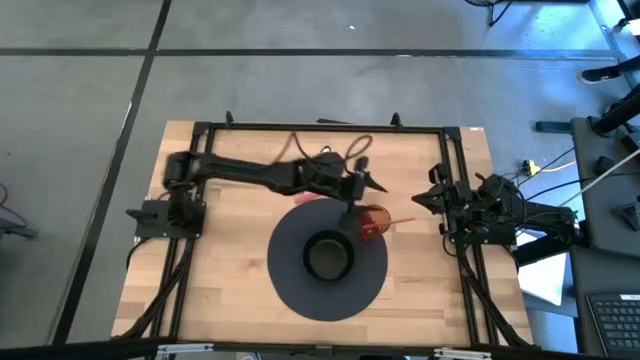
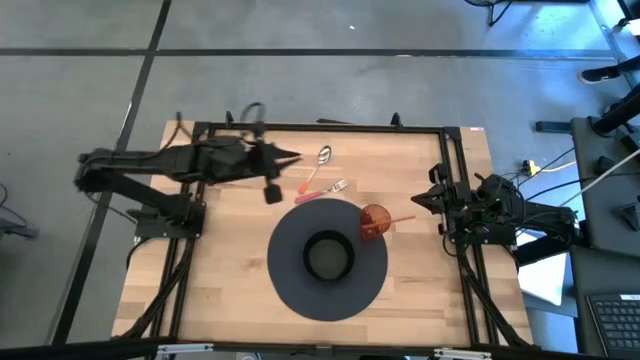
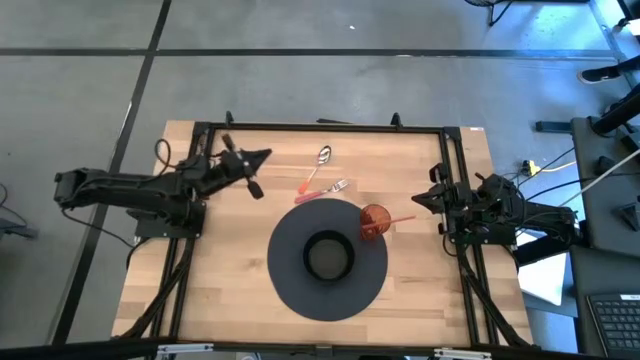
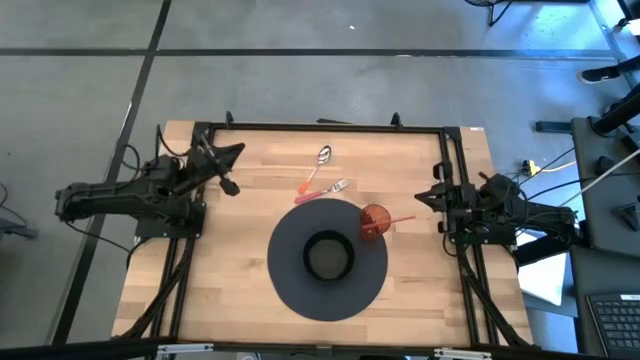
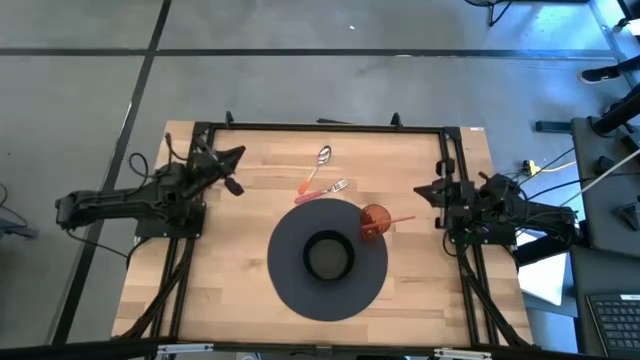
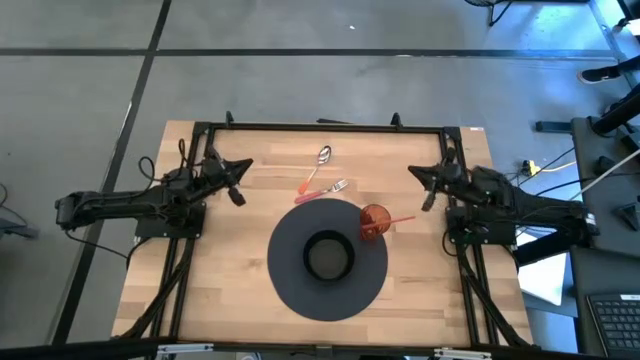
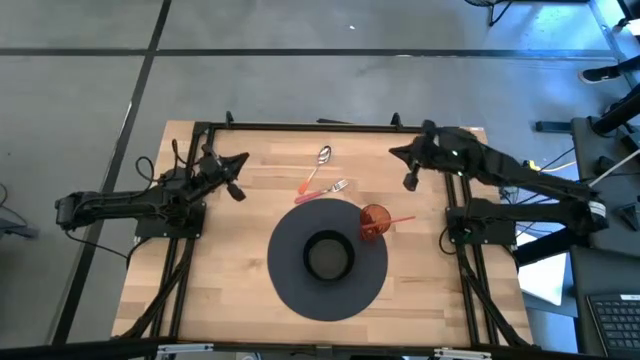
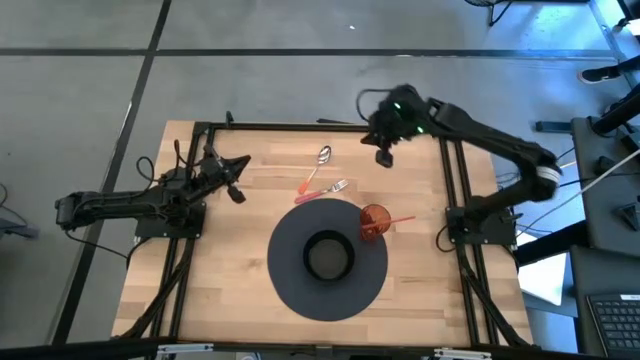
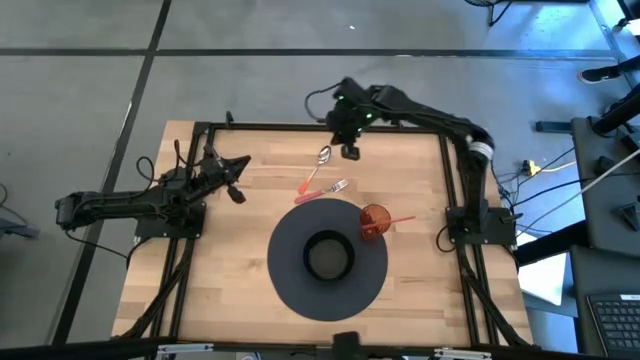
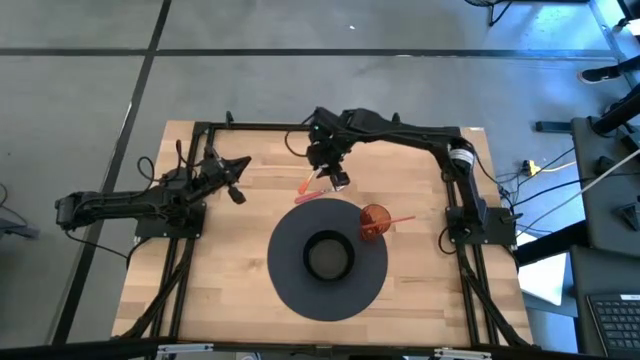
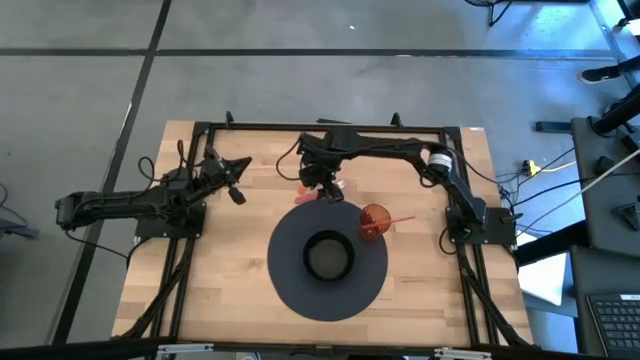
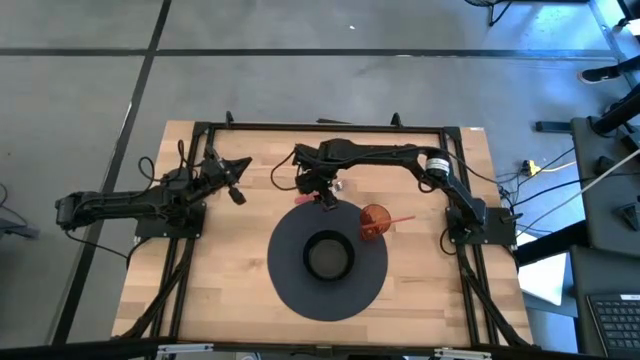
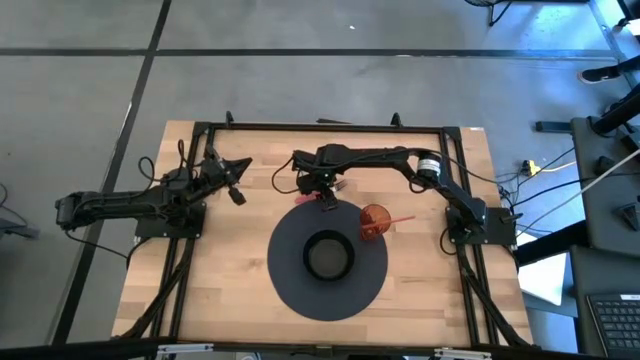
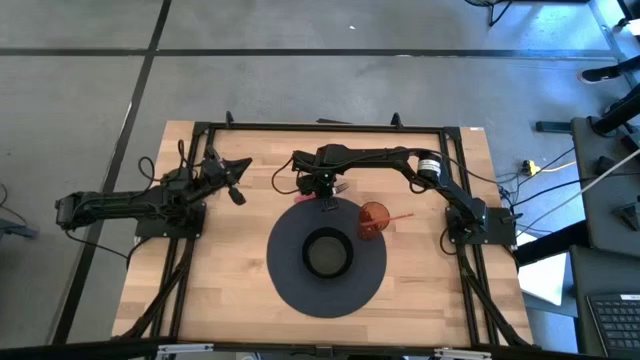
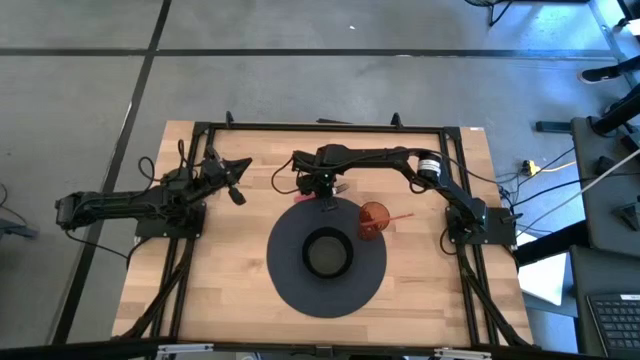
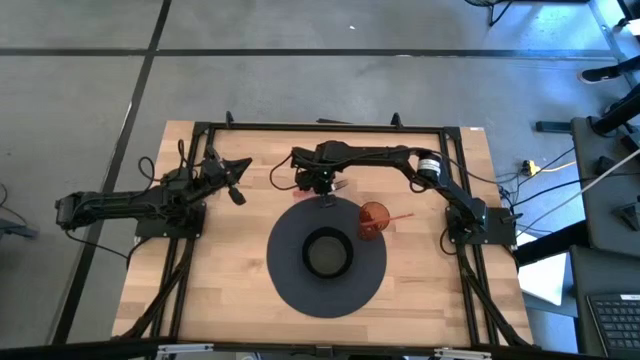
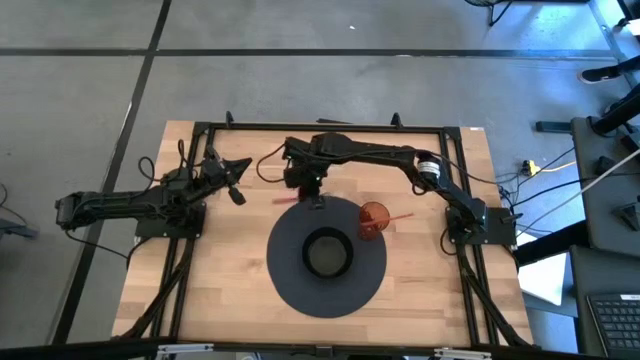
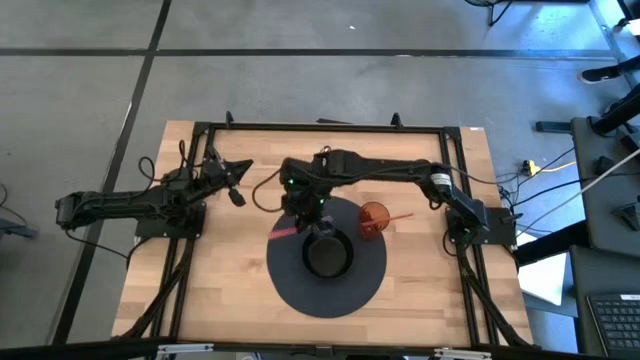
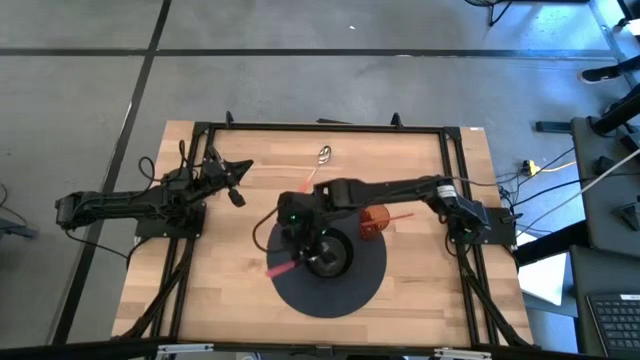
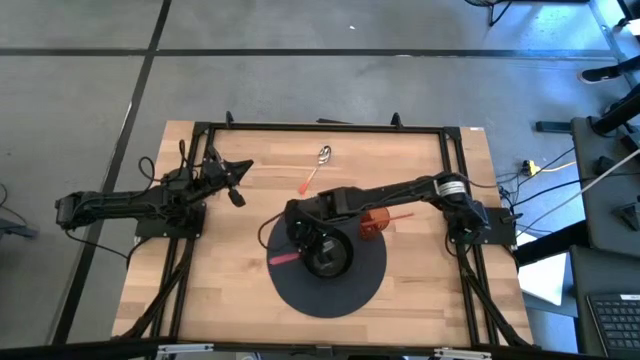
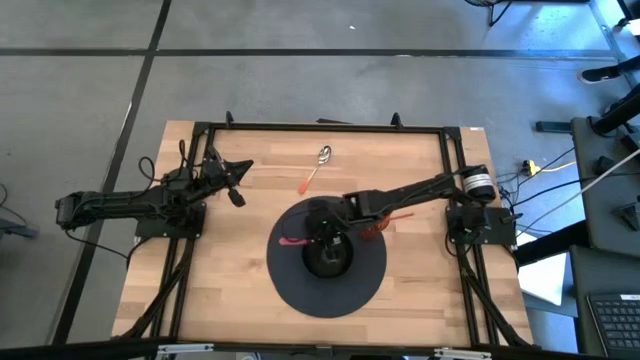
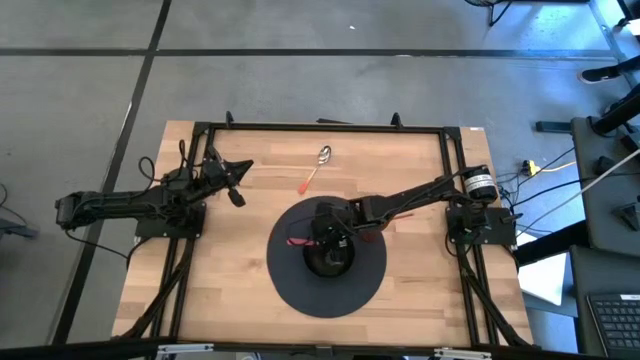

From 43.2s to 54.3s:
Task: Pick & Place Utensil
Put the pink fork into the black bowl

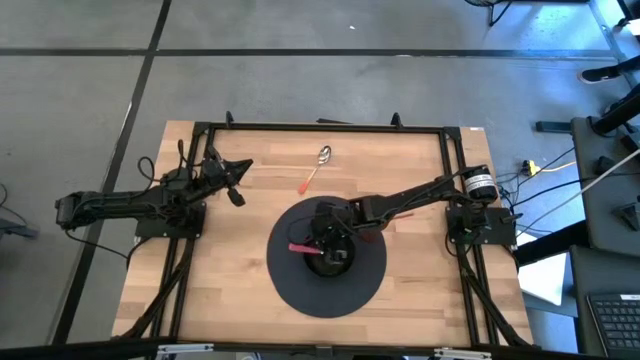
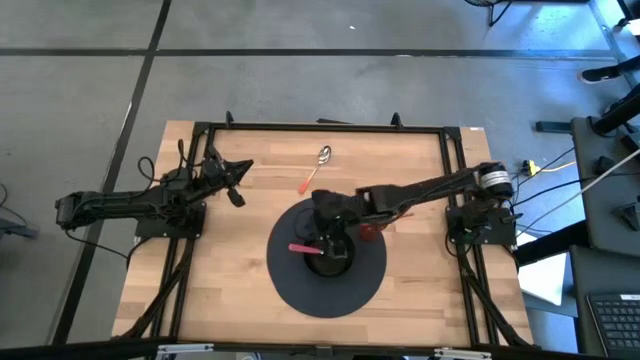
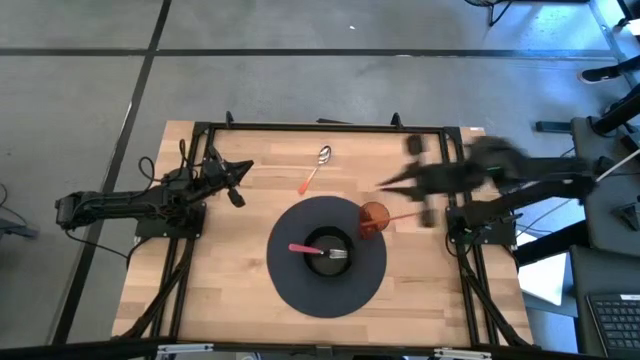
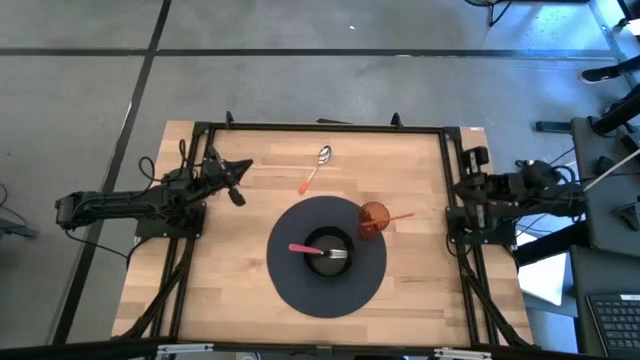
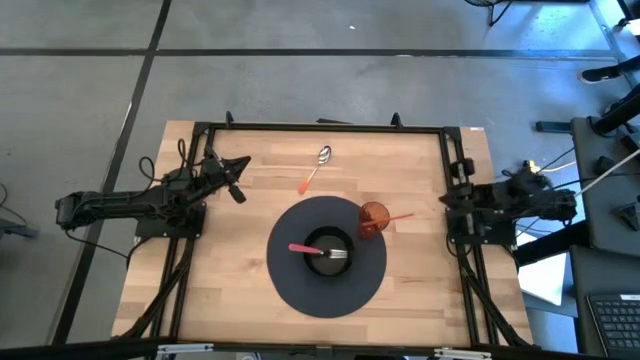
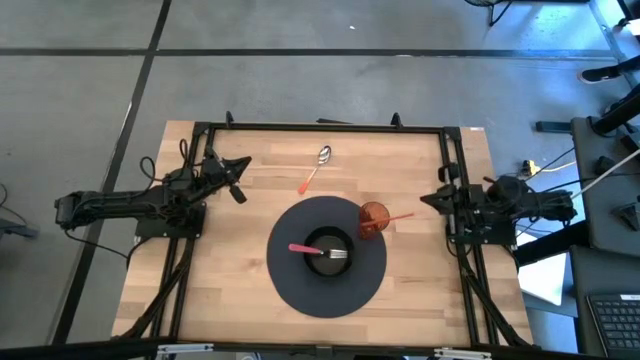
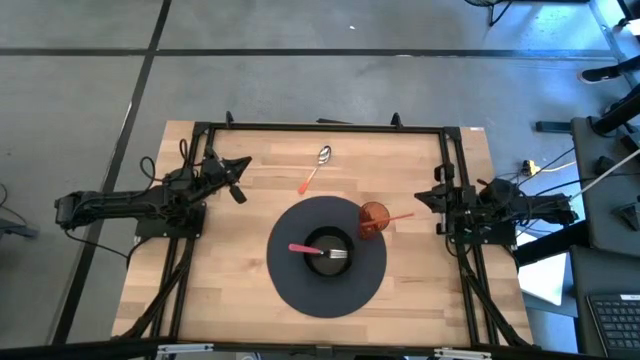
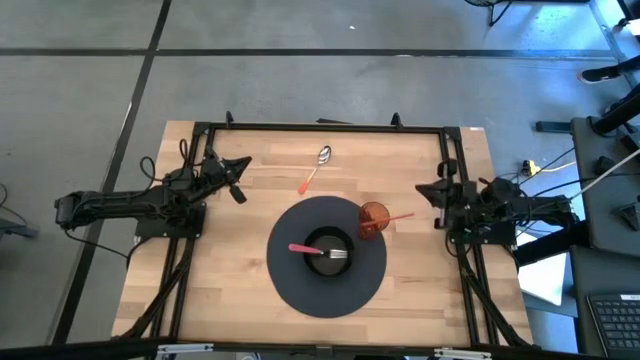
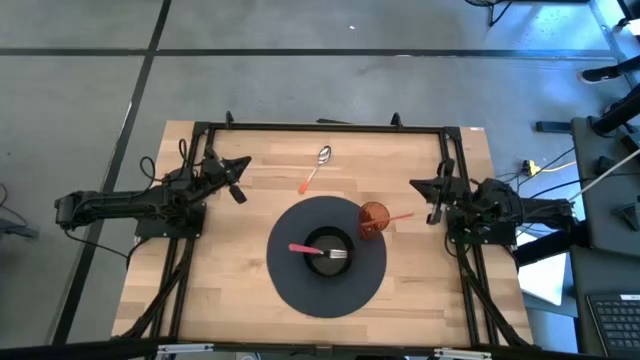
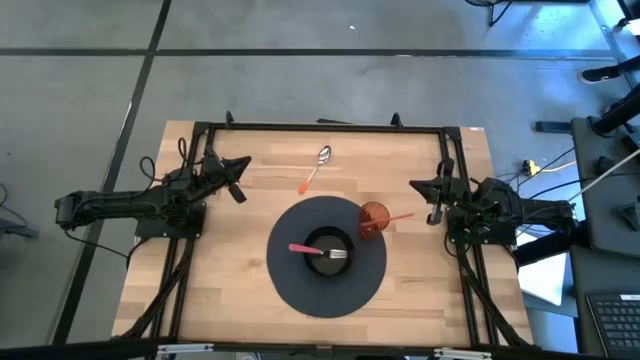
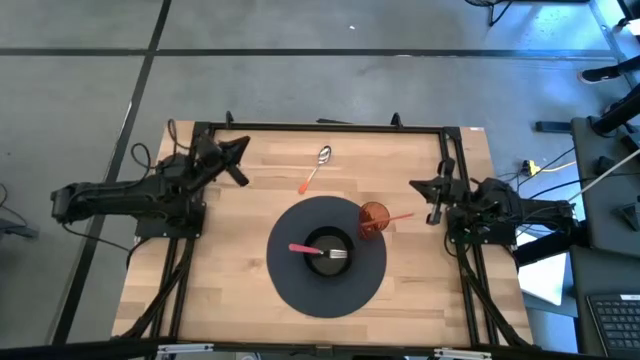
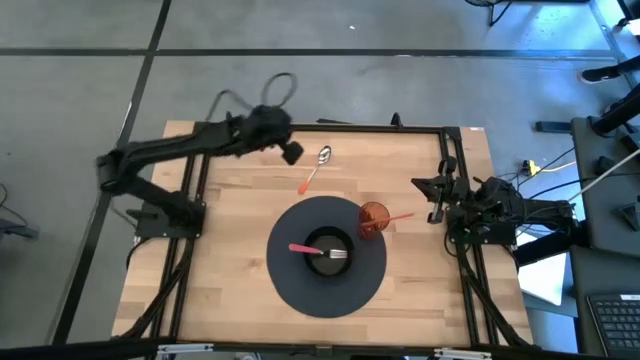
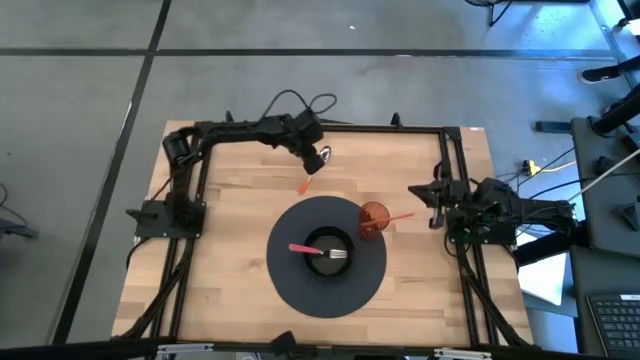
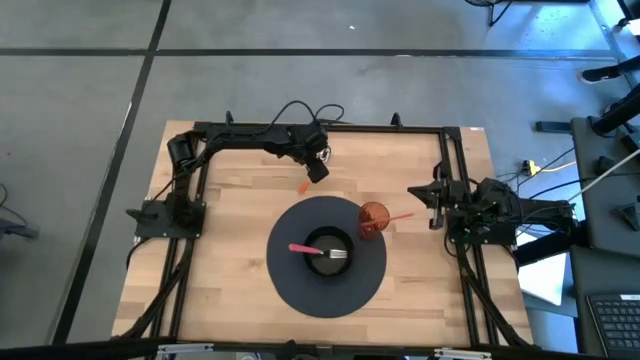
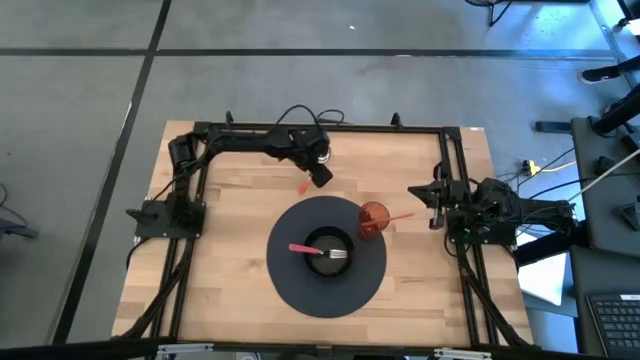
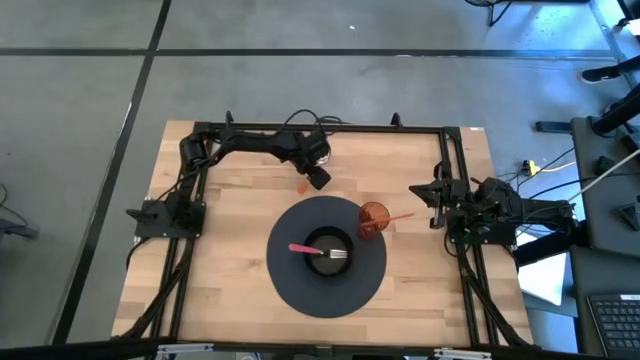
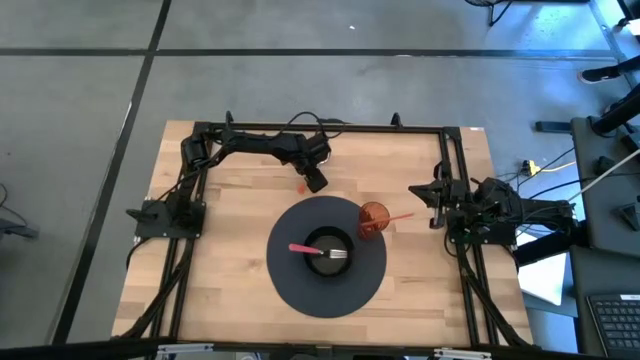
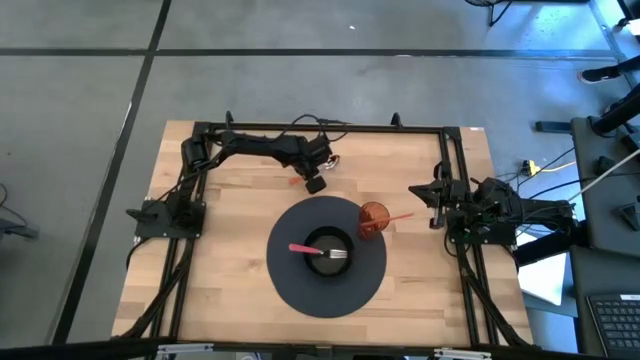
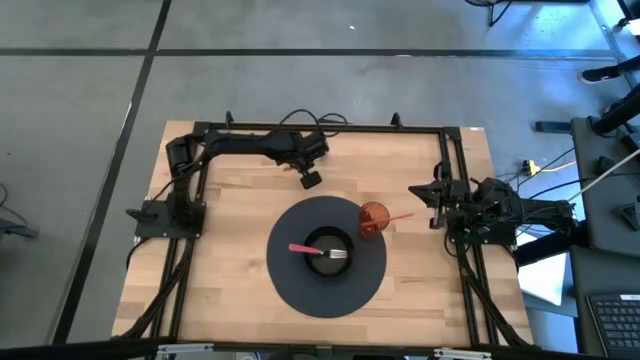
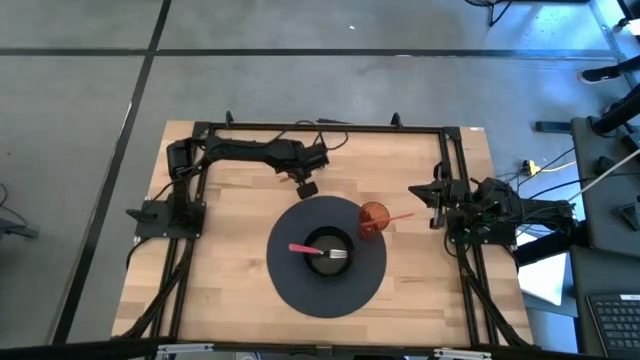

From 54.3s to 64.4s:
Put the orange spoon into the black bowl
